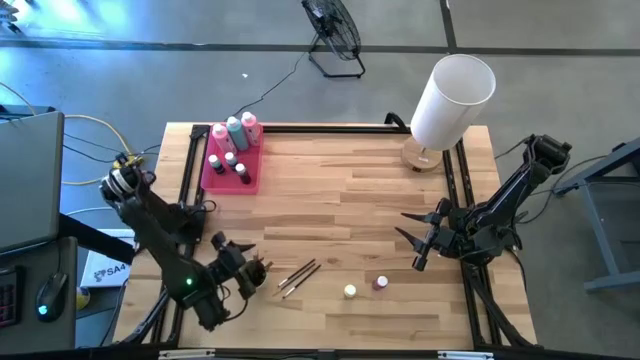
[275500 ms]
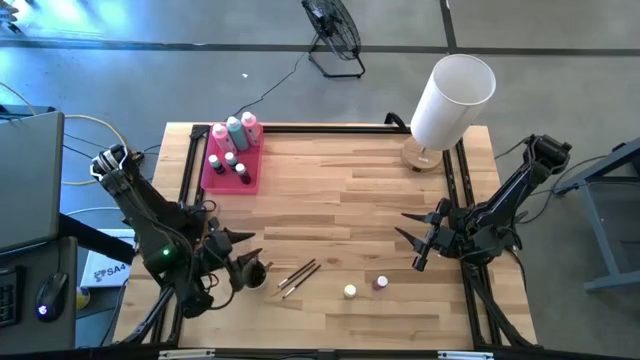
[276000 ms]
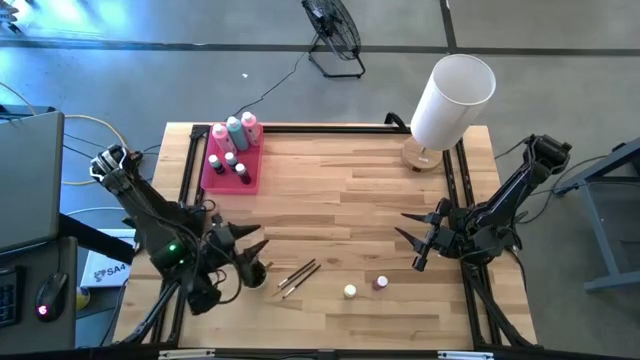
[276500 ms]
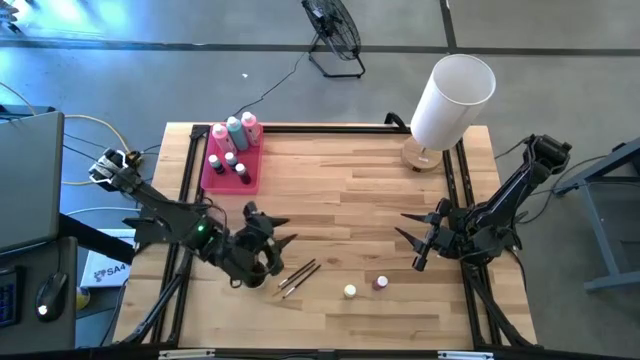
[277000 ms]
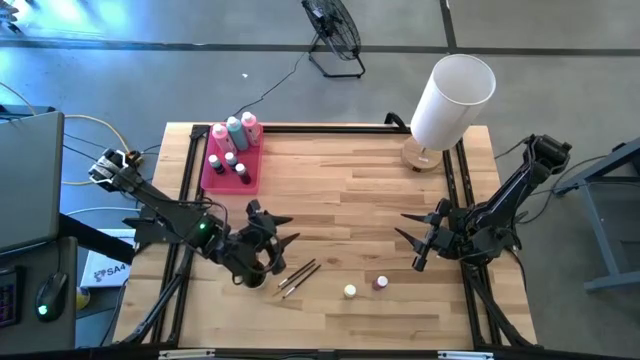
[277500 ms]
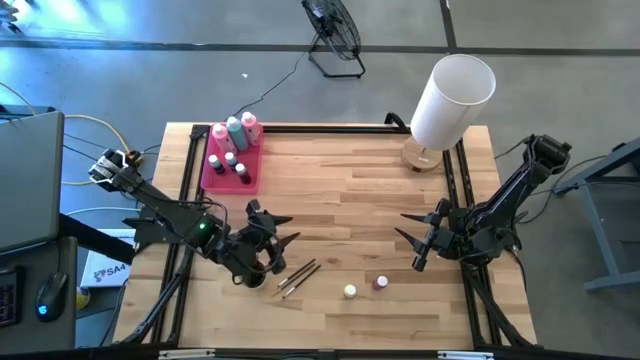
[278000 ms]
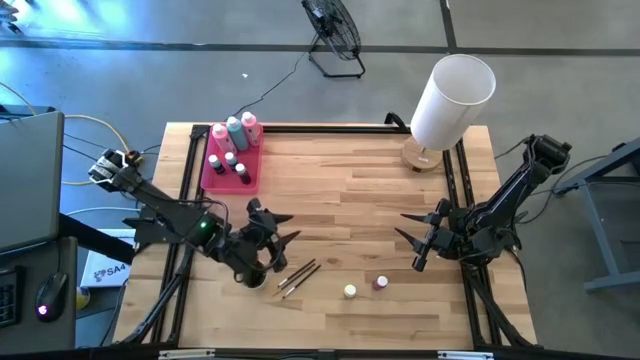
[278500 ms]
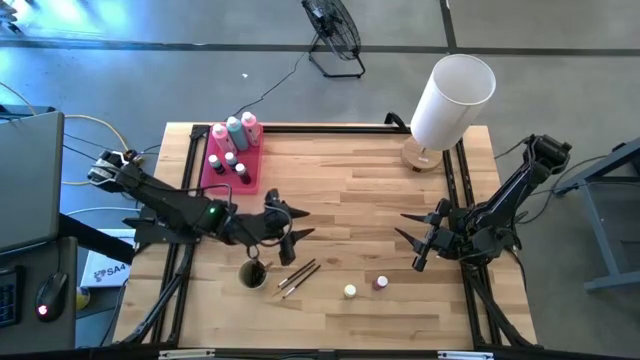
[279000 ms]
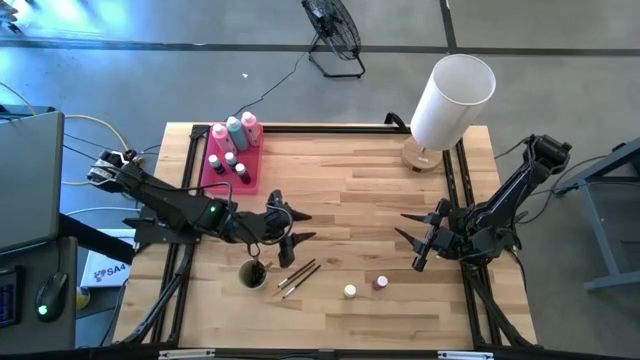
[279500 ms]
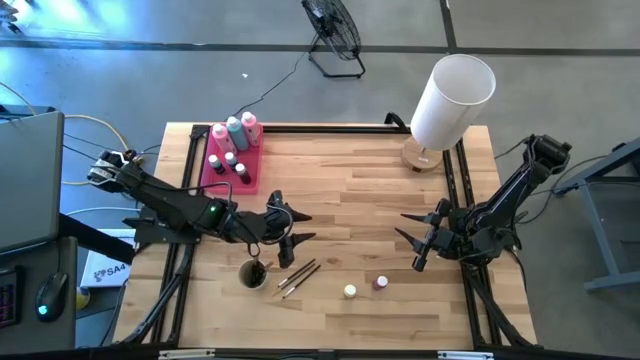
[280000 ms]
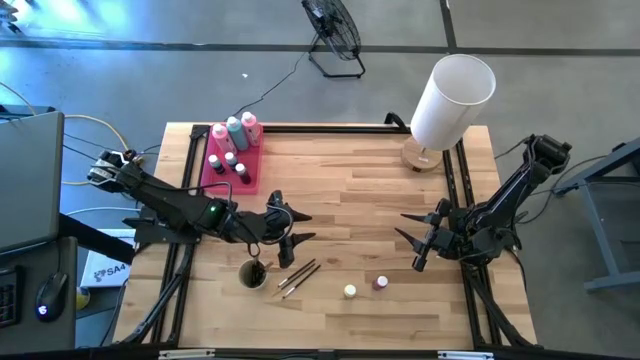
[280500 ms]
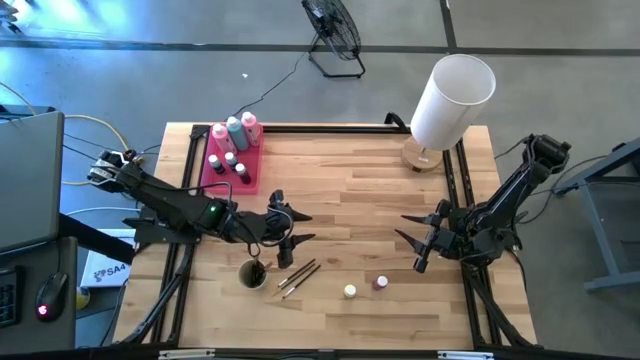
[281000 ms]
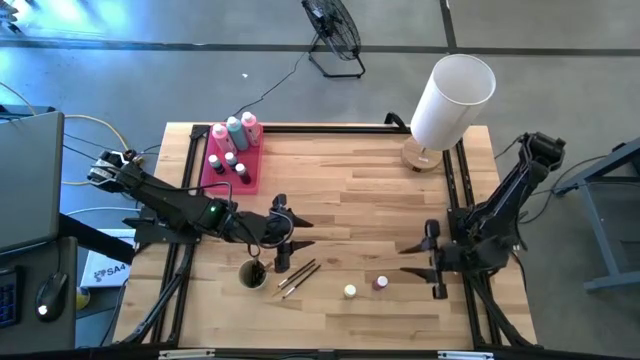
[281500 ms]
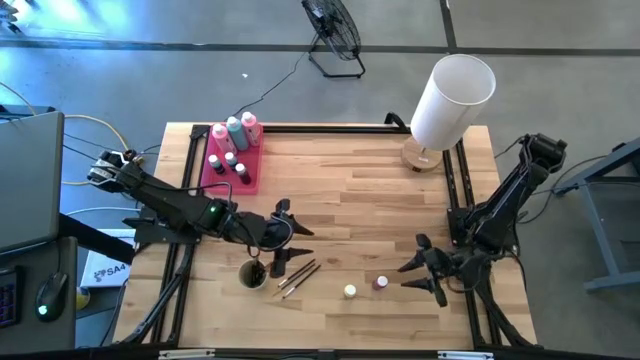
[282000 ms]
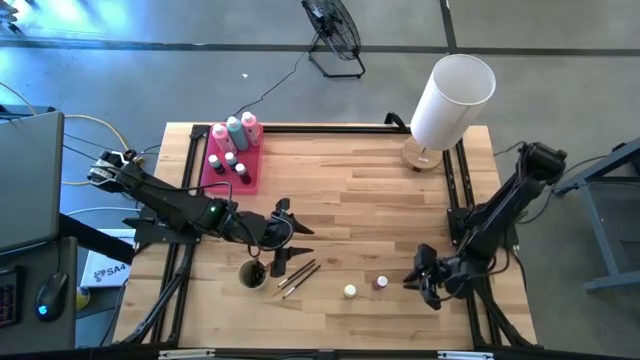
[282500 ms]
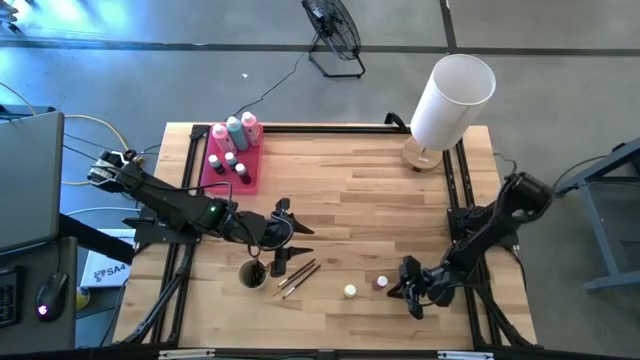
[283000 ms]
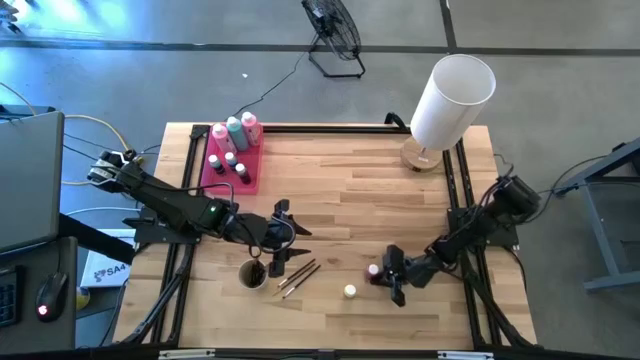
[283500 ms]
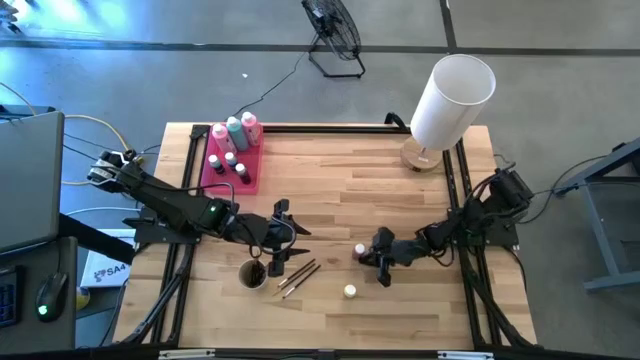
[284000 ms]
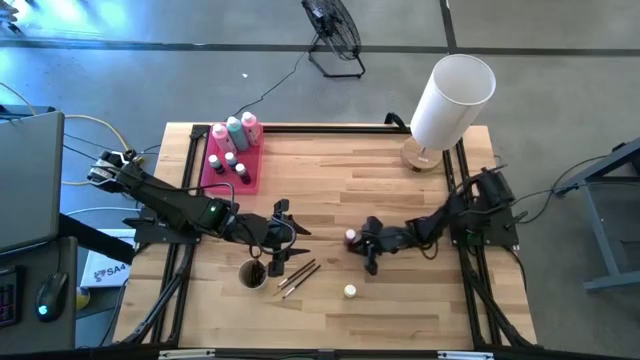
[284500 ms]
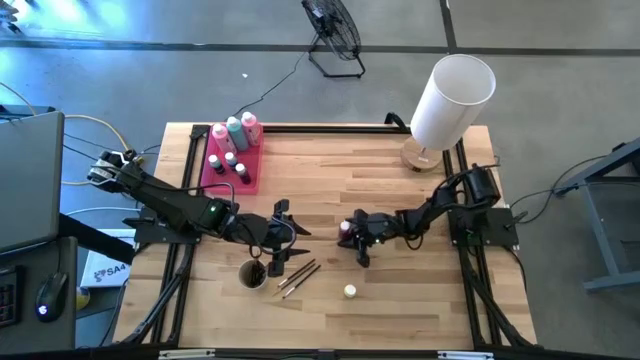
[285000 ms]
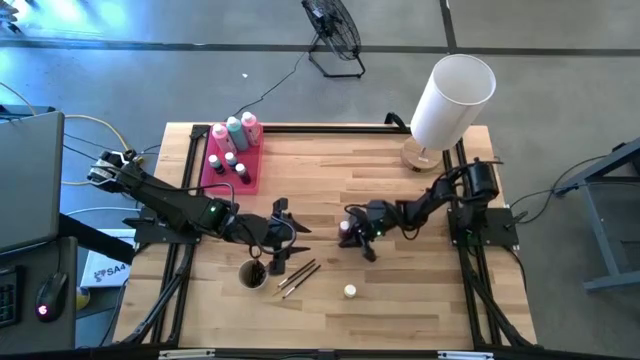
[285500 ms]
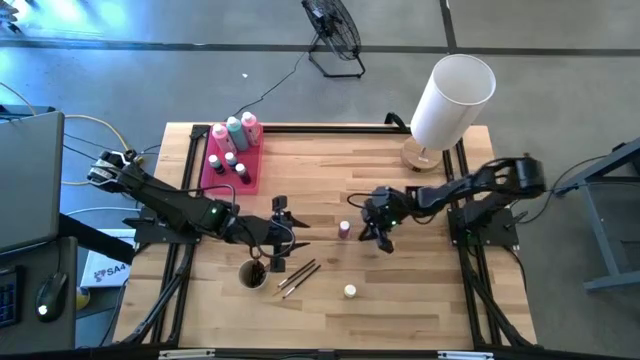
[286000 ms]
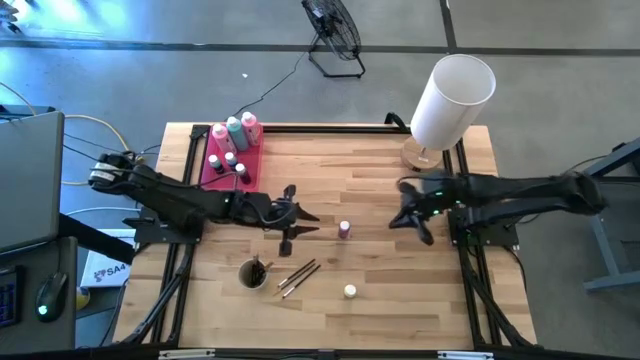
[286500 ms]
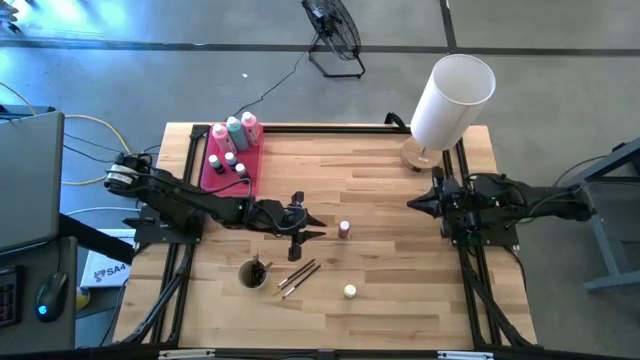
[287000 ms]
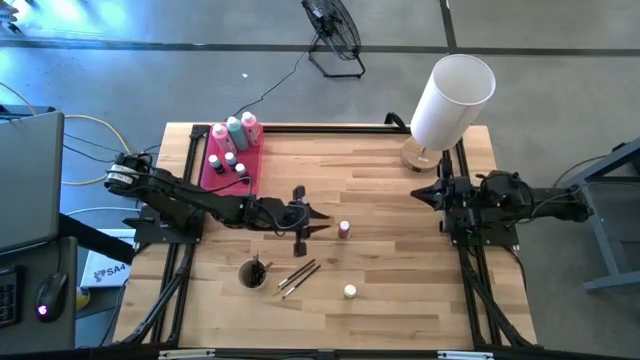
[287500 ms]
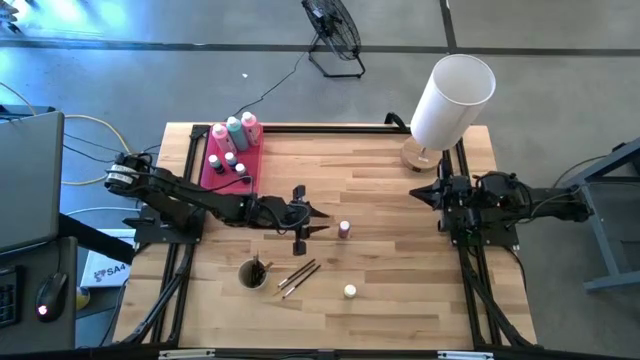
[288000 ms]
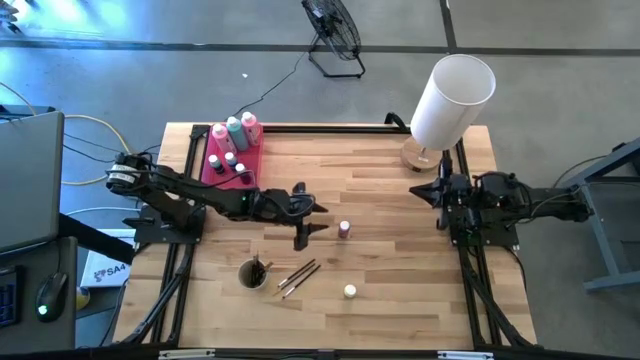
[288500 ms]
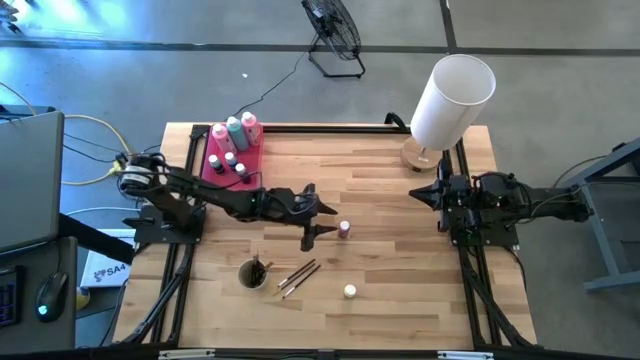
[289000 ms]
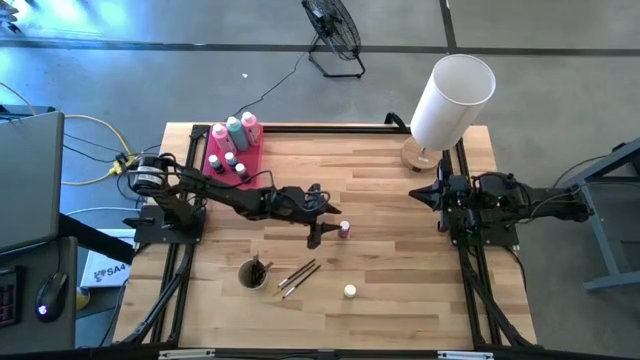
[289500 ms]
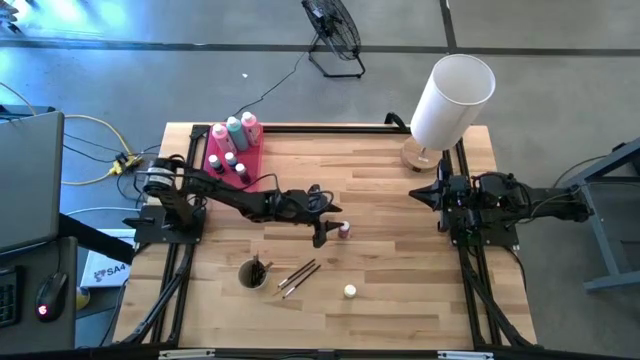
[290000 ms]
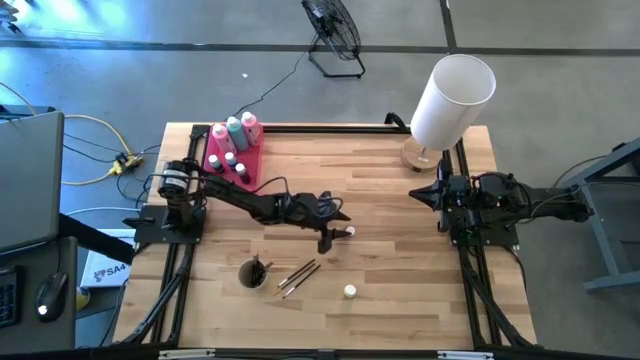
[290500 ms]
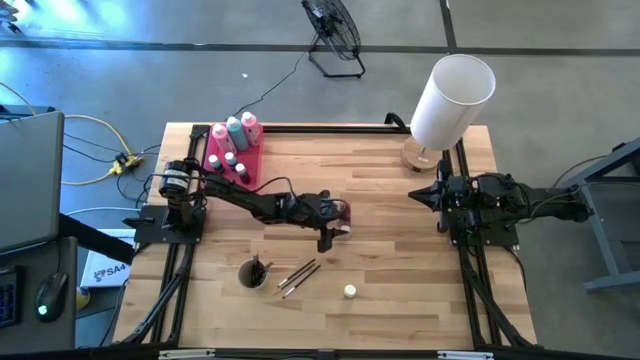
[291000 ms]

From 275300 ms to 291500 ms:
Task: Pick & Place Paint Supplies
Put the small pink paint bottle into the pink bin
